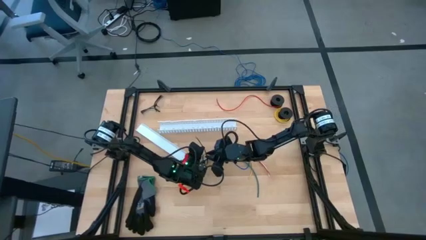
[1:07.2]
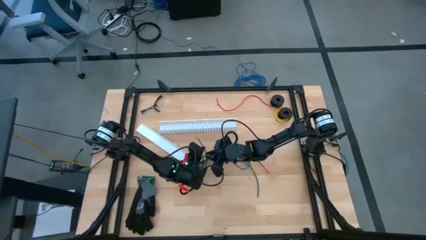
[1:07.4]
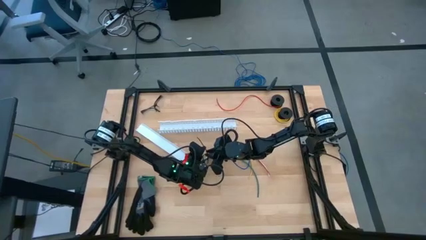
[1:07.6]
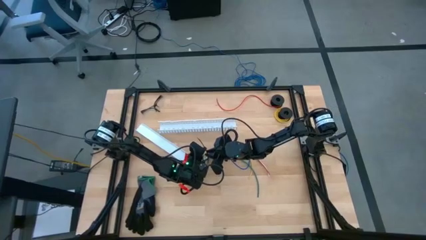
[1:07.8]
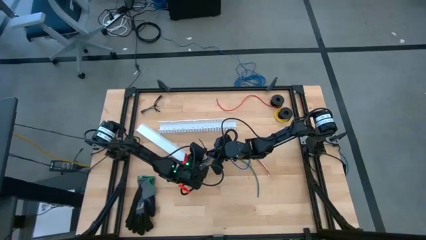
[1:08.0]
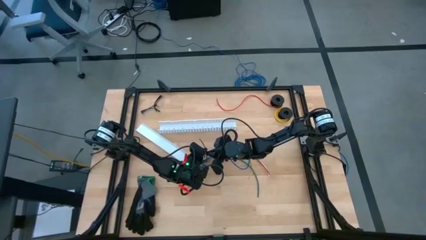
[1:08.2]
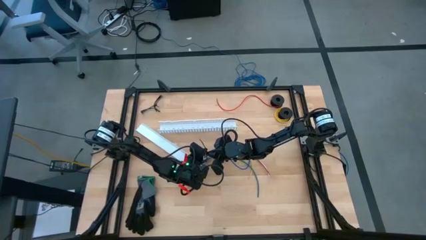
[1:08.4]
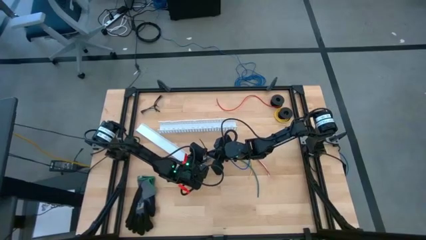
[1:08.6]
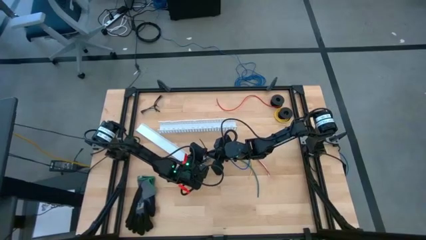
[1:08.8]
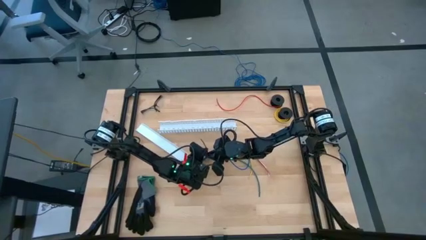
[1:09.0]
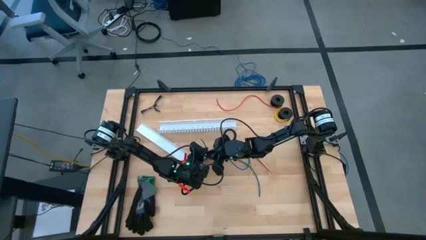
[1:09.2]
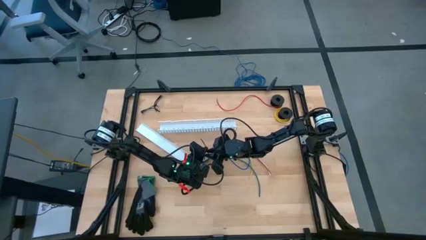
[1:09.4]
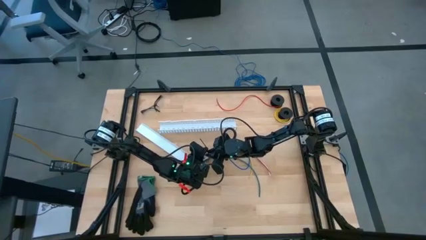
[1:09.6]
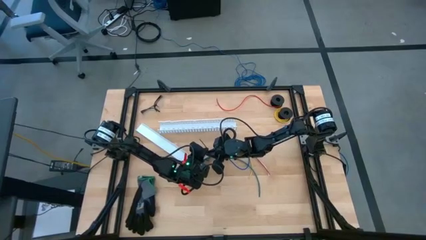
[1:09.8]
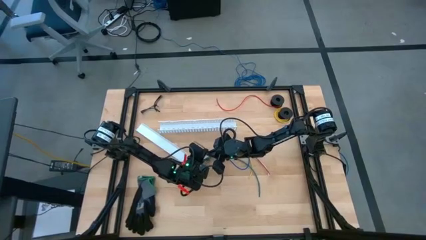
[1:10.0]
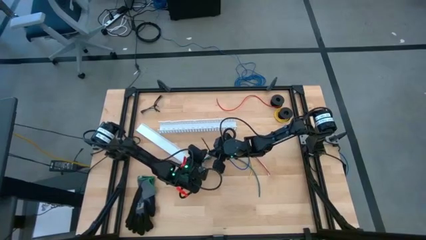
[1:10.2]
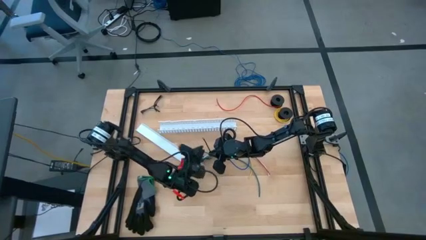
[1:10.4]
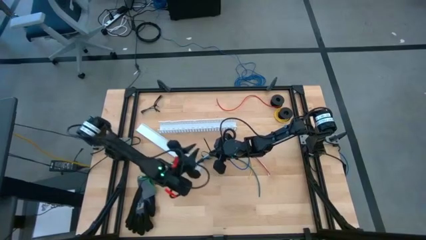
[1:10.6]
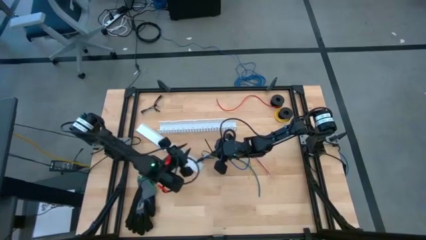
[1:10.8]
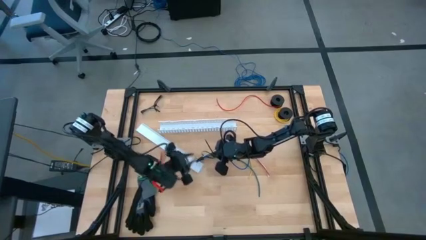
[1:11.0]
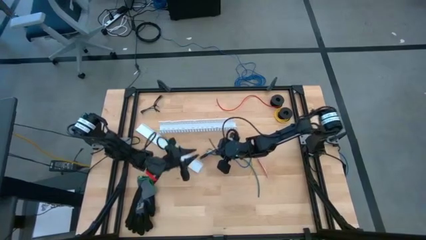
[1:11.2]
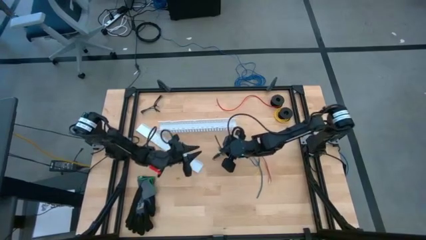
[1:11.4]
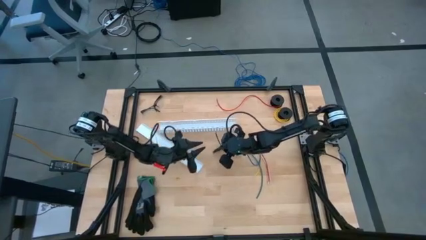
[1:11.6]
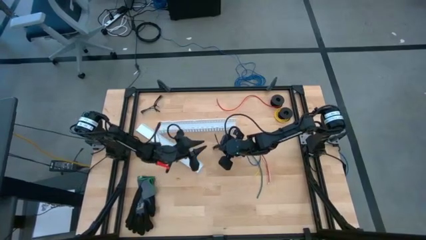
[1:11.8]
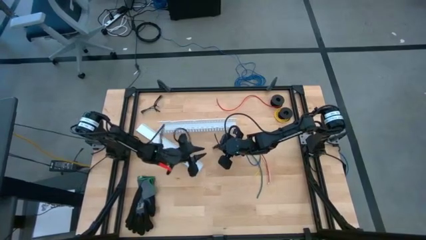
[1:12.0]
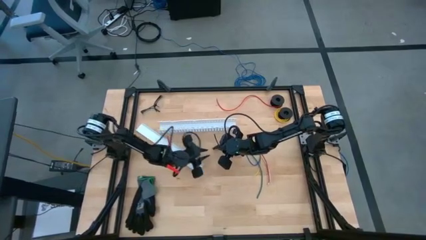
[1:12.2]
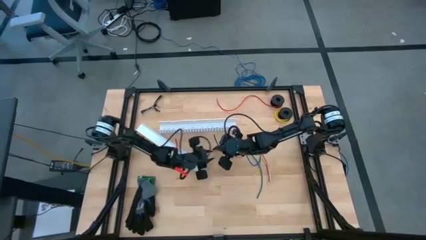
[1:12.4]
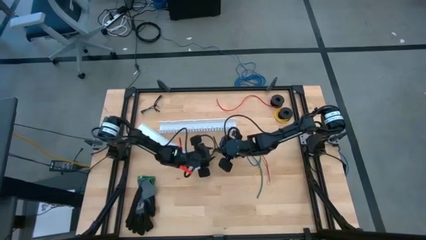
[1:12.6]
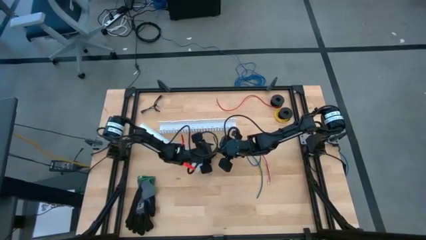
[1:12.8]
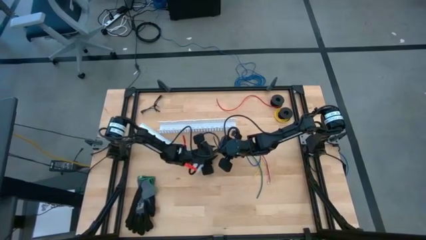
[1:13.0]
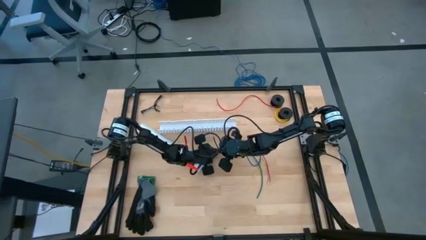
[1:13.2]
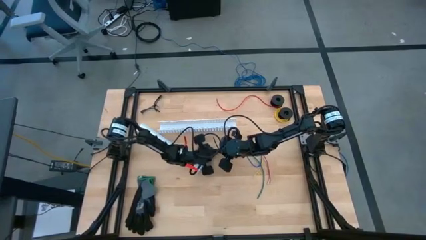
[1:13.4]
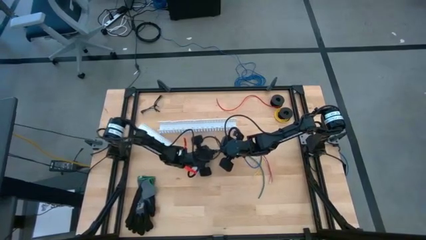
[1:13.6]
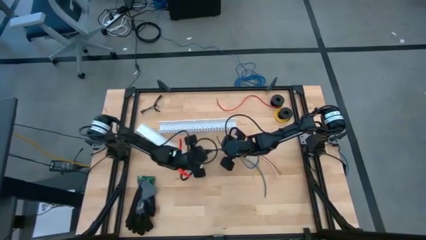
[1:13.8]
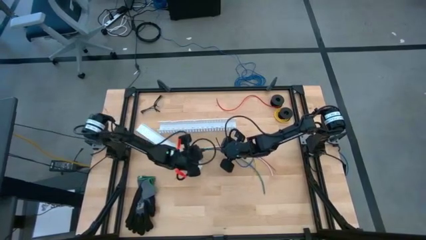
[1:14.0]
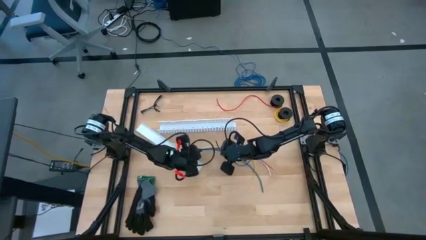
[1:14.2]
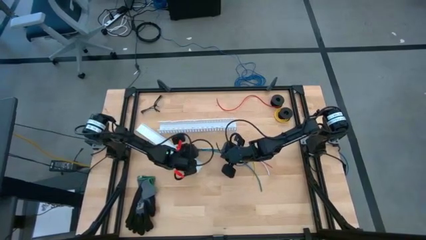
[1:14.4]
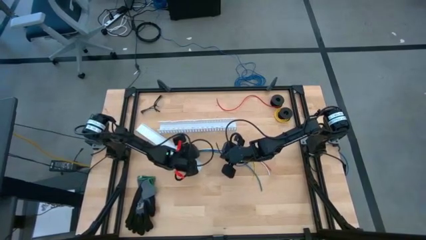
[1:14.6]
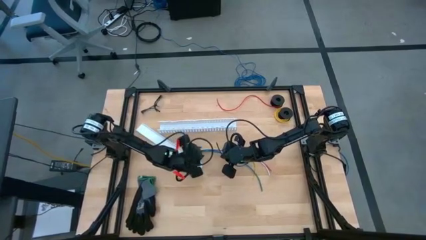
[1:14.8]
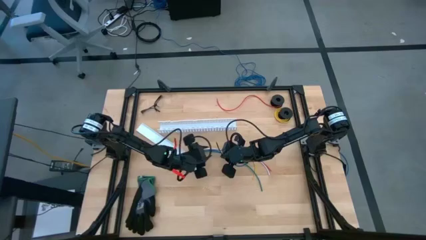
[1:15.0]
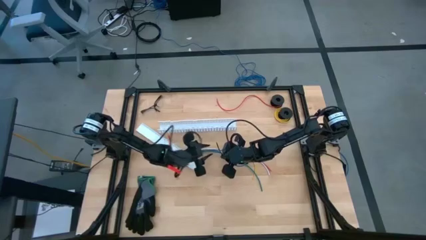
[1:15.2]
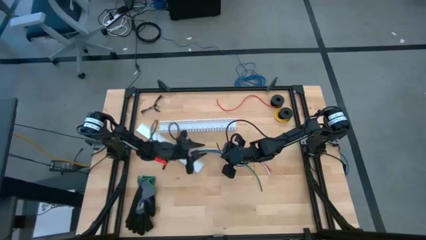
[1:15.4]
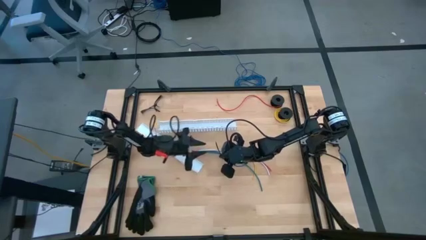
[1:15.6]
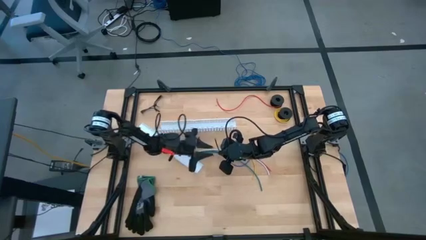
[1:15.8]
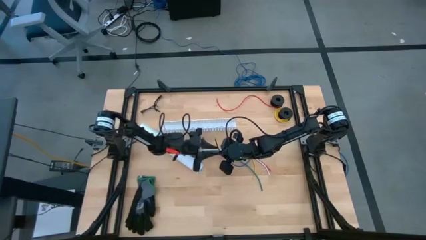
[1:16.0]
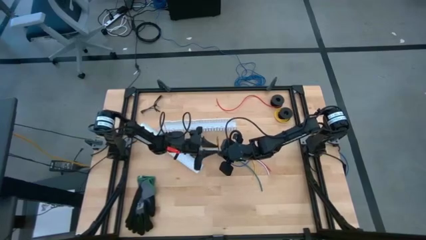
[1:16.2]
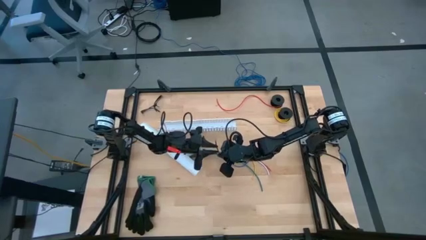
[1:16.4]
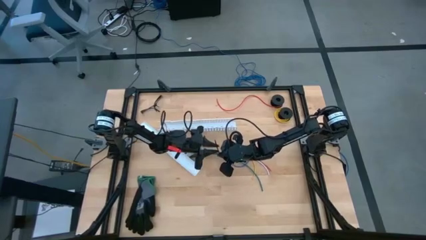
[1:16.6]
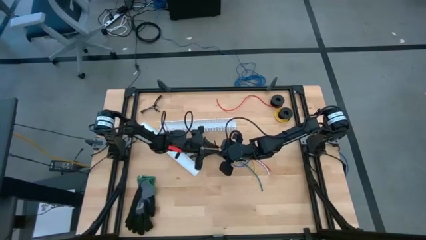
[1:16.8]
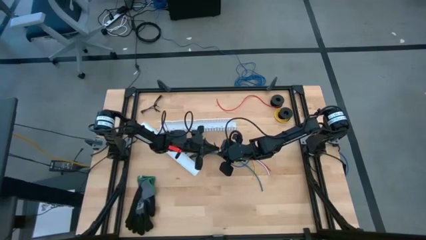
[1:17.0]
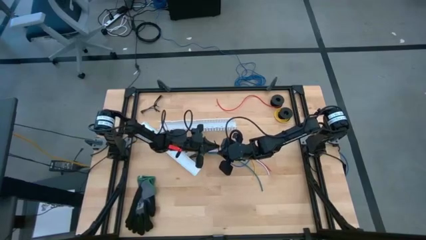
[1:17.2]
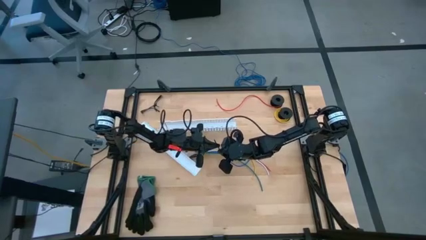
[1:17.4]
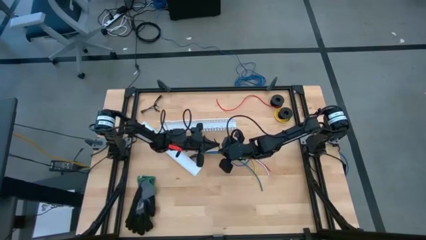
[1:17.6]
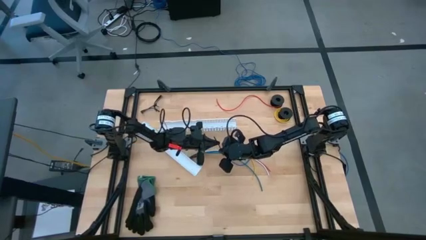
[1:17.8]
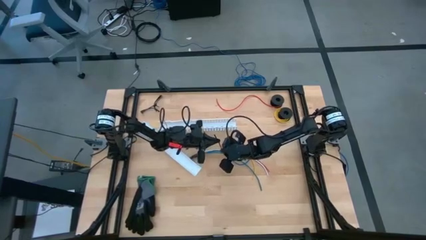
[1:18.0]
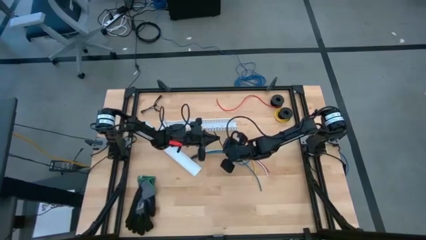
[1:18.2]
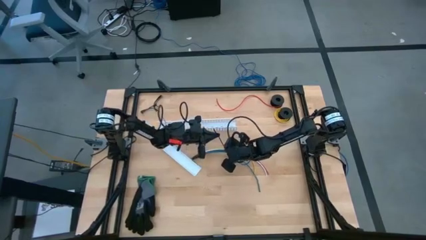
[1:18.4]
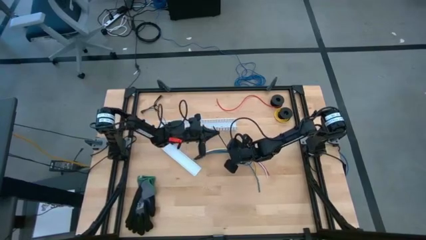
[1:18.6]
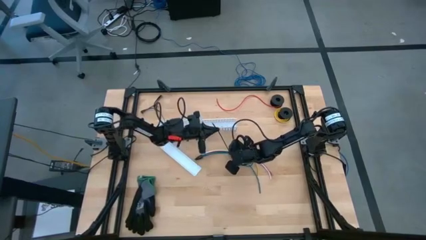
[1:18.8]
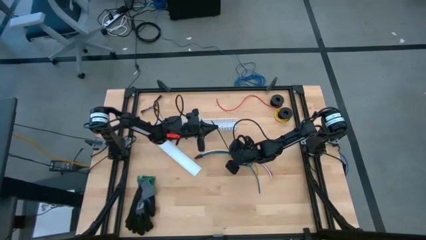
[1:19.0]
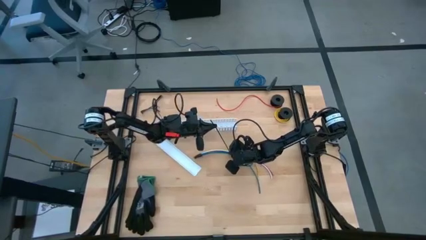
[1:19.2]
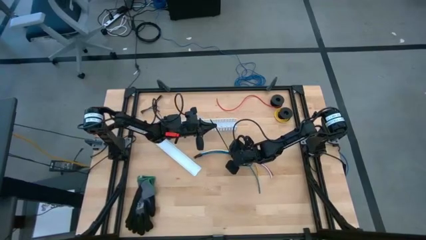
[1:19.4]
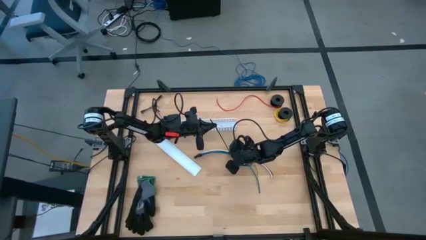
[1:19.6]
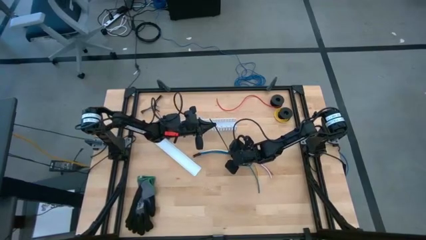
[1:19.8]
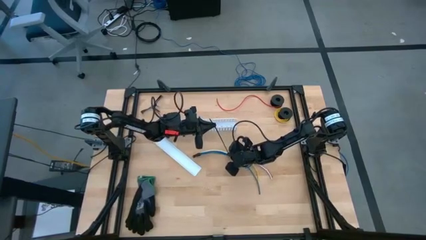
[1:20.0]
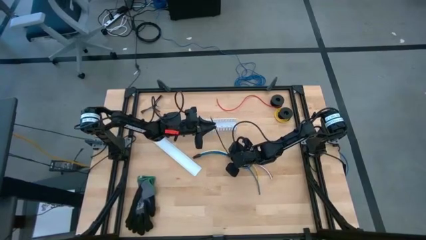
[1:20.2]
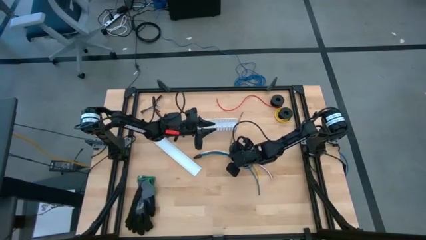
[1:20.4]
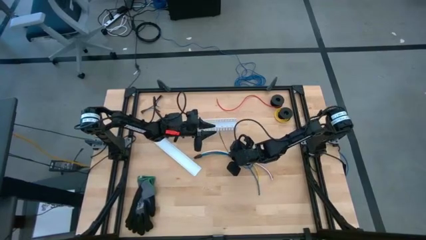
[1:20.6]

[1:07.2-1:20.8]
Task: Ziptie cables
Wrap the cables with the black zip tie

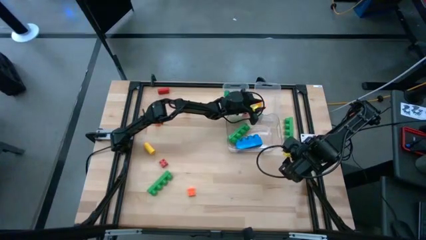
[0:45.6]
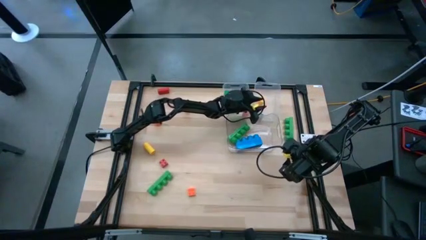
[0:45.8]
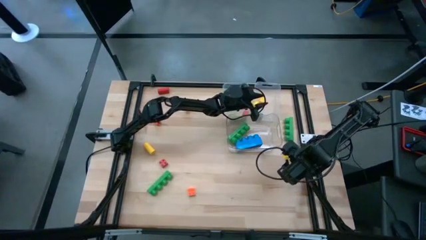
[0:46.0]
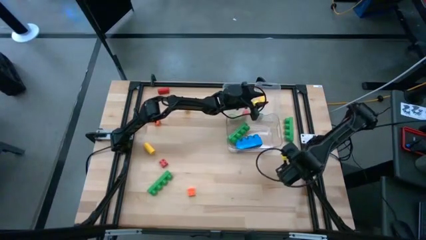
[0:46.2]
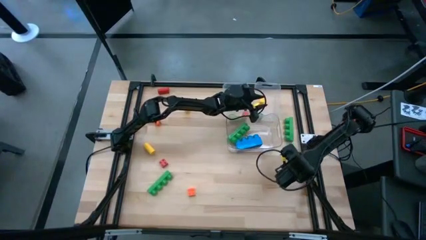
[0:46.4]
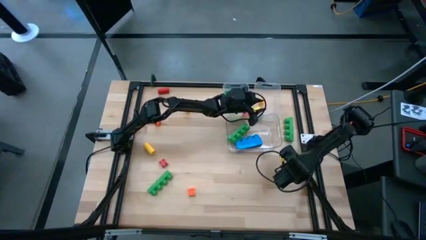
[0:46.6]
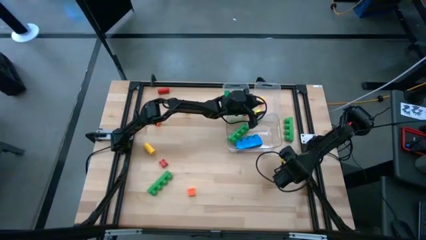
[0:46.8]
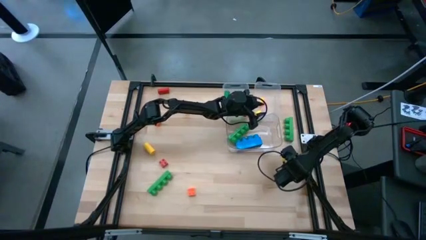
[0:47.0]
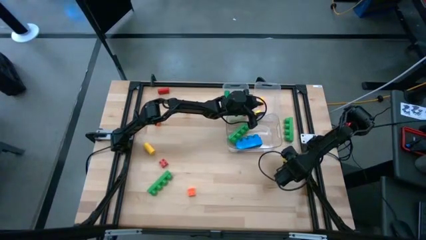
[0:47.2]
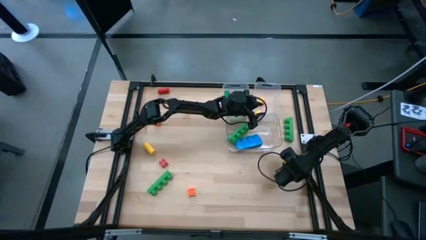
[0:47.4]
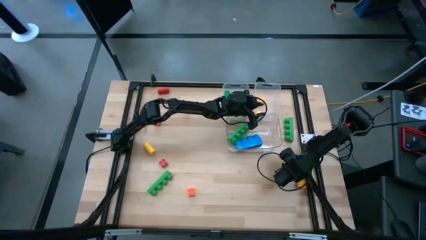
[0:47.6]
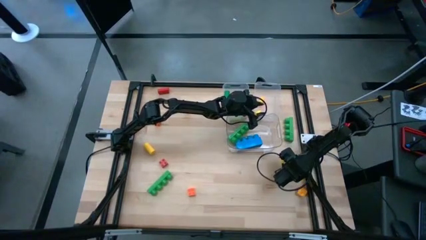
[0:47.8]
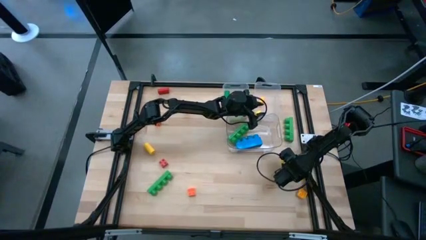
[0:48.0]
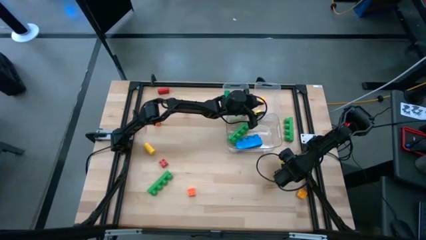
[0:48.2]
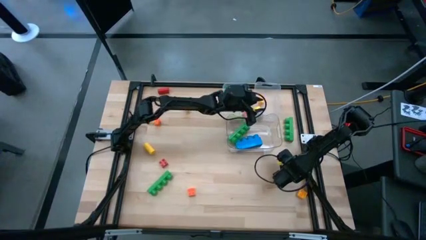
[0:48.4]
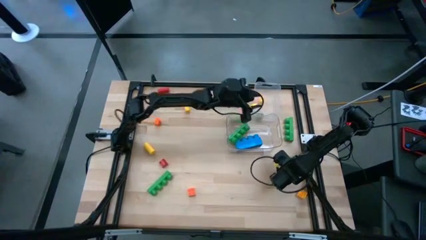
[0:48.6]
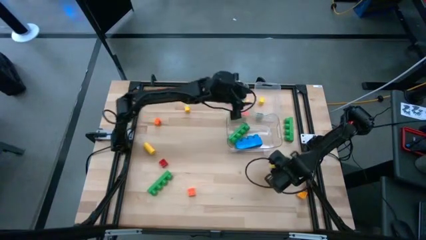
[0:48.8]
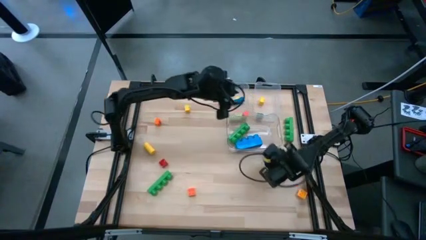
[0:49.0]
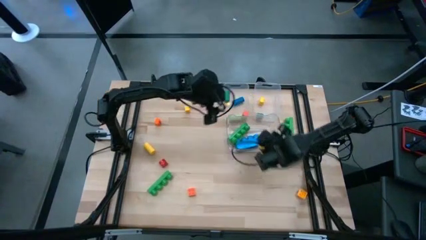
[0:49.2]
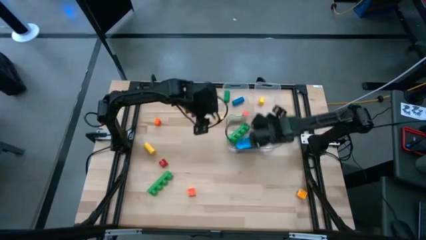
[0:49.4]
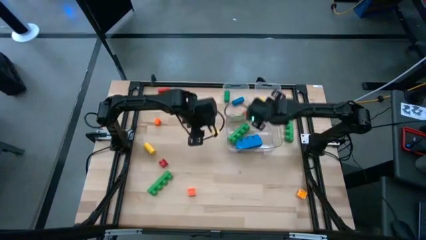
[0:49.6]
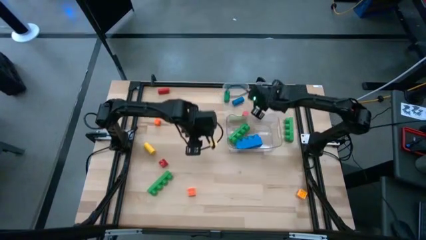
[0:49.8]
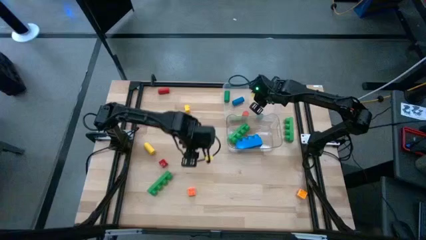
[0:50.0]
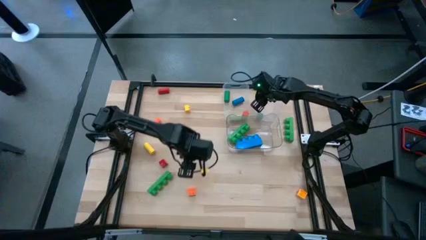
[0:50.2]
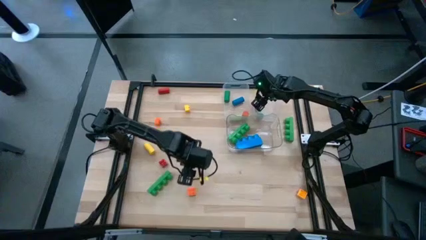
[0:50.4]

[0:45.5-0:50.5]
Task: Sort blocks by size
Put the small blue 4 stud game piece into the right transparent bin
